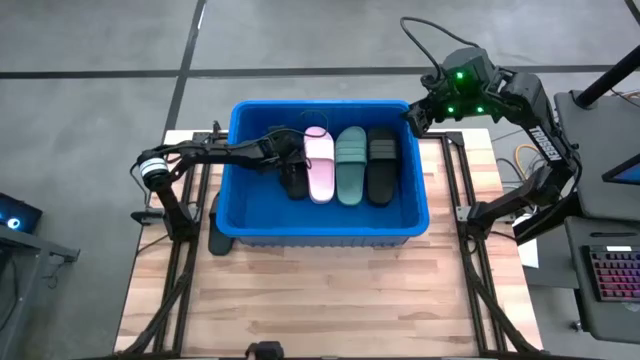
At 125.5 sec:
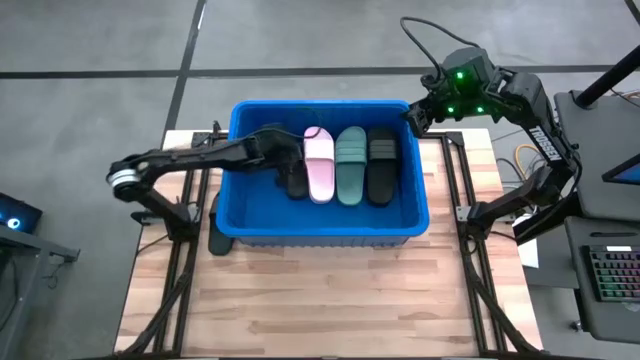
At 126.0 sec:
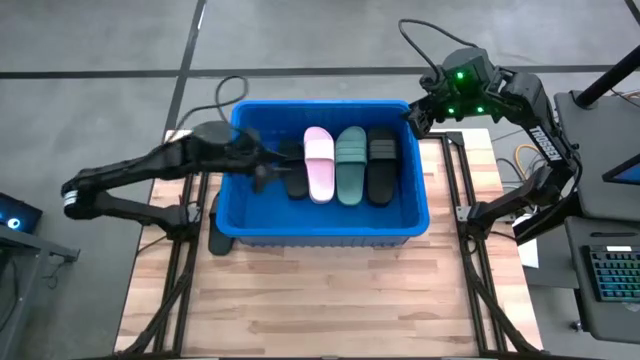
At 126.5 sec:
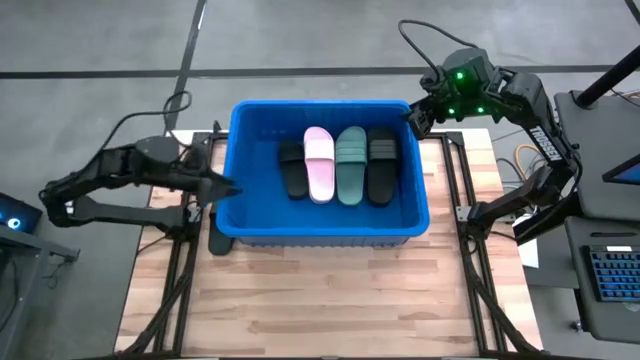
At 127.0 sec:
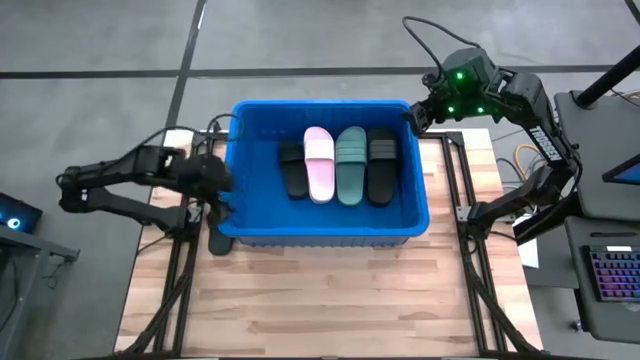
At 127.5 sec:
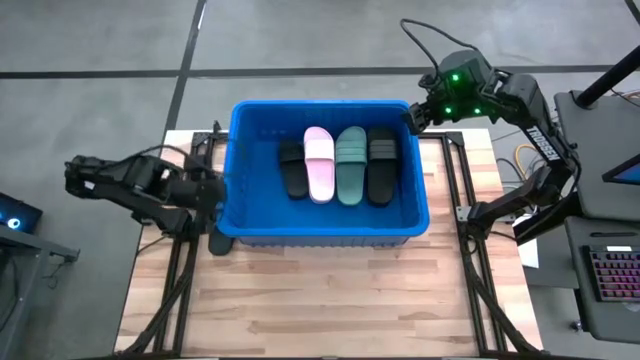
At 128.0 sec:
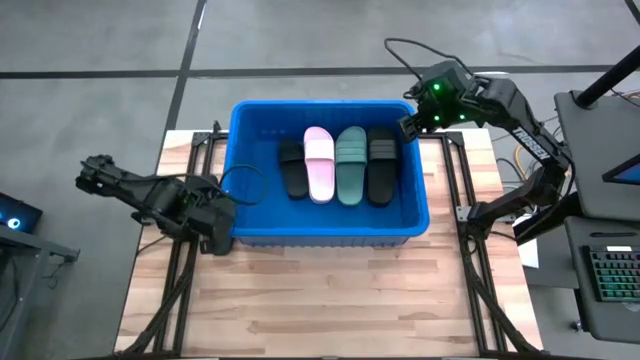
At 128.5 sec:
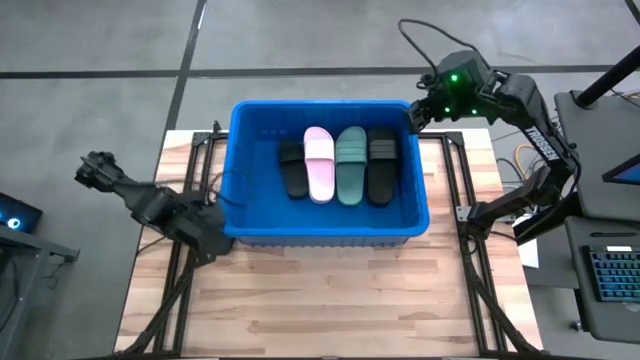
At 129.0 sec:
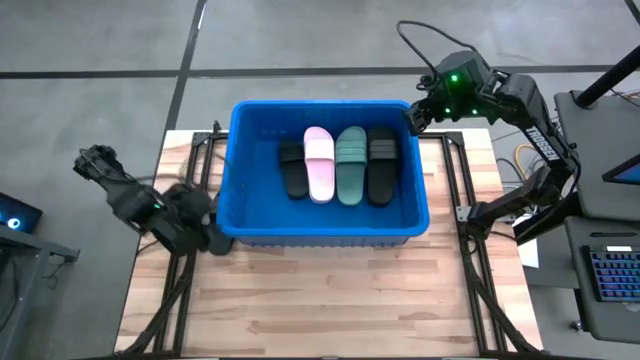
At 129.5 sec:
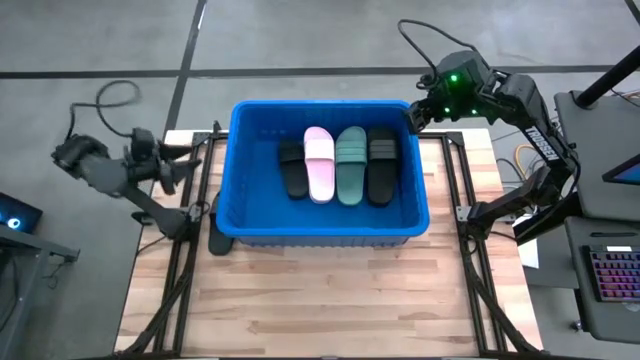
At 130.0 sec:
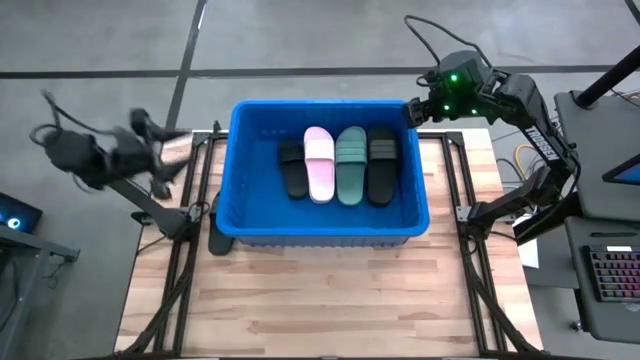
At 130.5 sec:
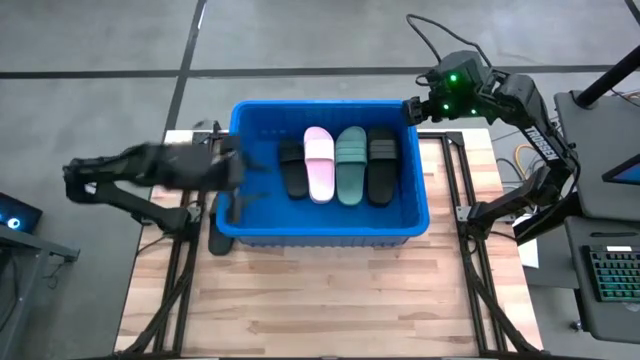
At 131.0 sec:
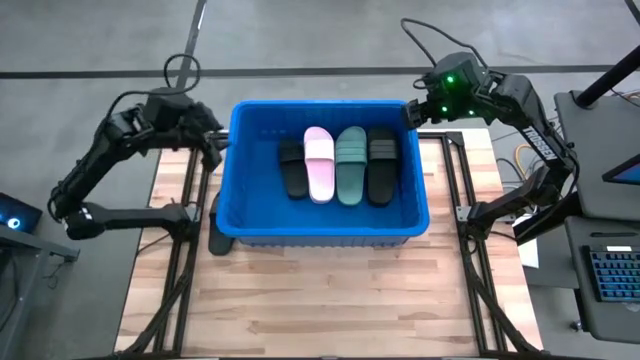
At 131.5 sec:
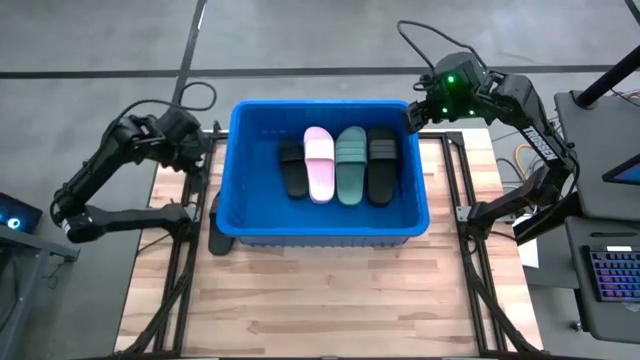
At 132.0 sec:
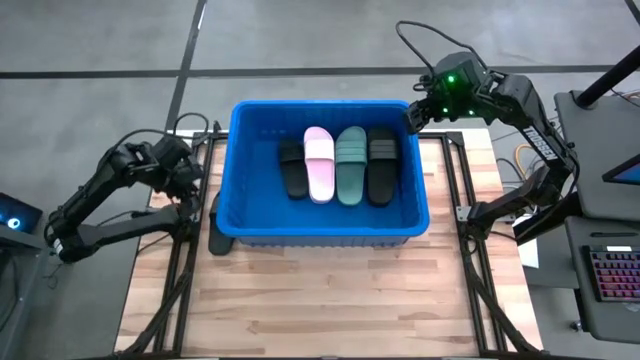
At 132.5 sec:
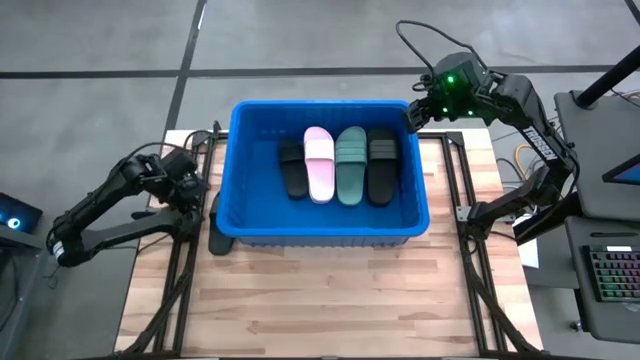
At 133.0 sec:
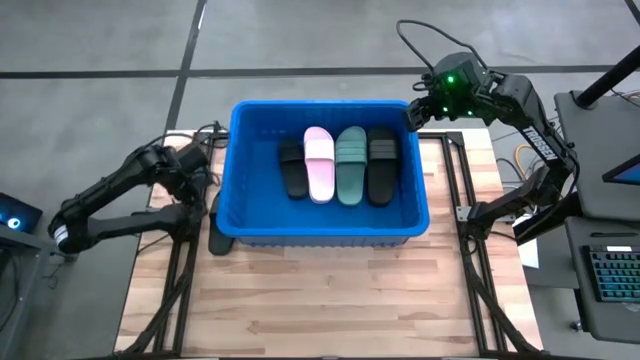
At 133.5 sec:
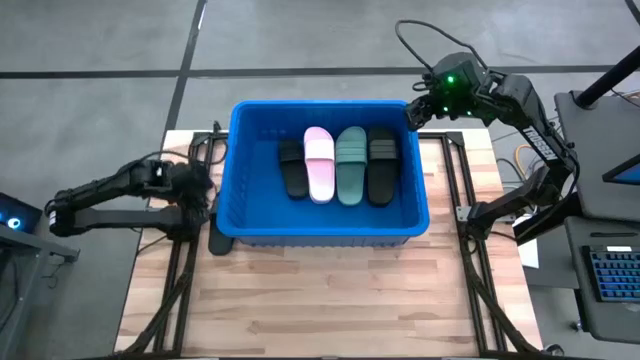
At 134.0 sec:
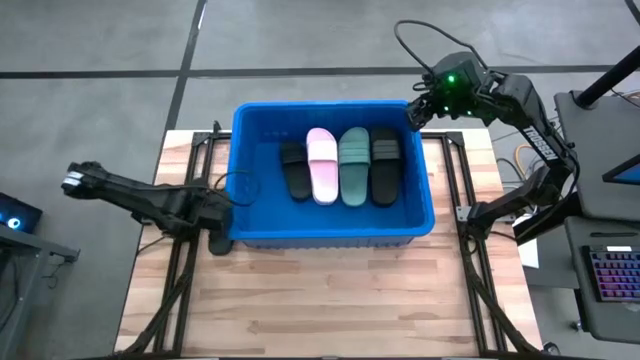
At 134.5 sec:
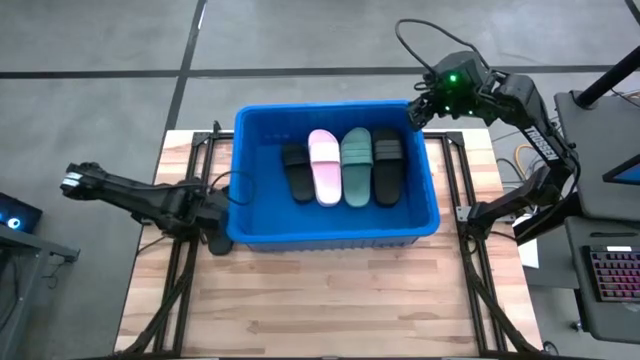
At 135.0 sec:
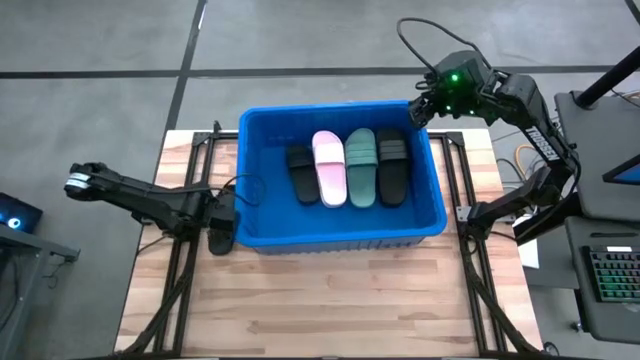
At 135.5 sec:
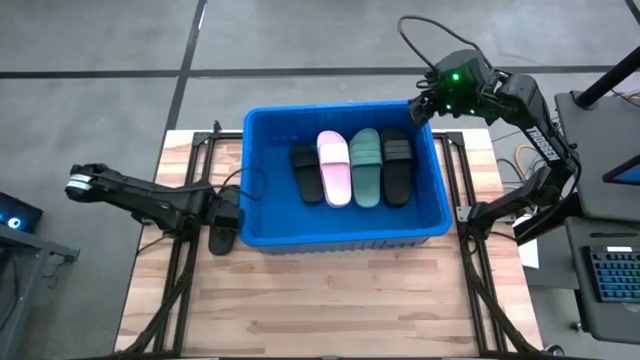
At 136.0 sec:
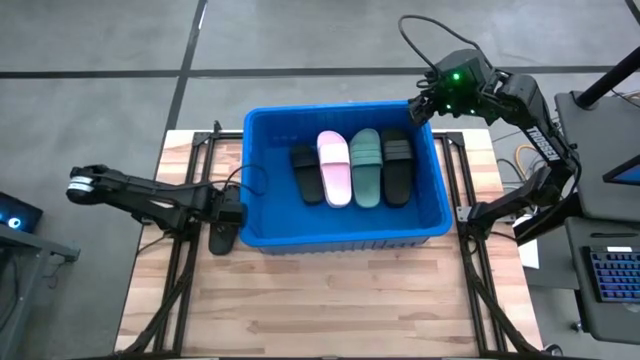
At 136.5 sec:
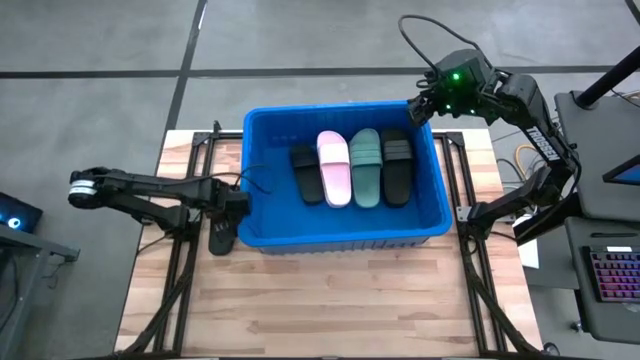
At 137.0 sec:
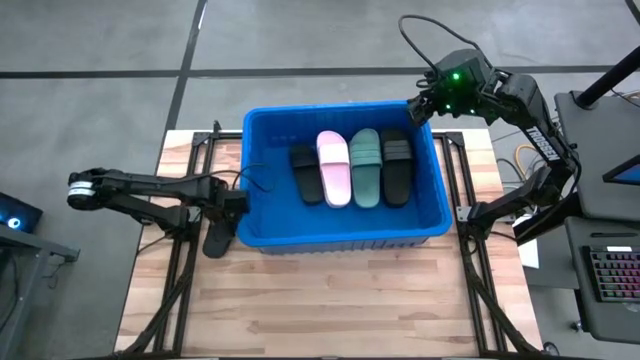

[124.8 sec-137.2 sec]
Task: Pick and place slides into bin
Put the black slide into the blue bin

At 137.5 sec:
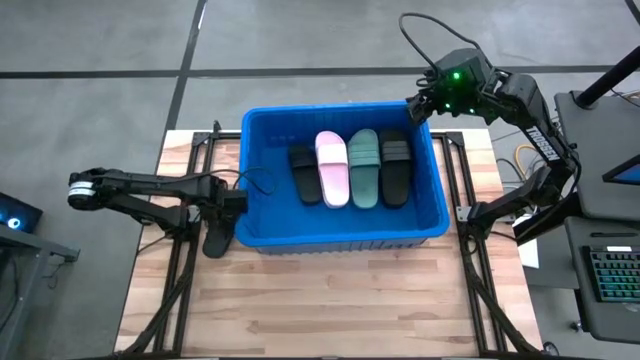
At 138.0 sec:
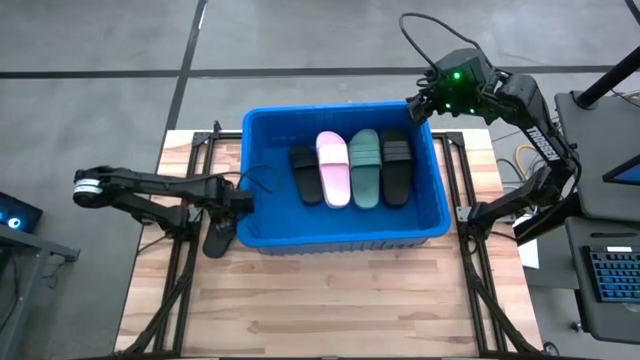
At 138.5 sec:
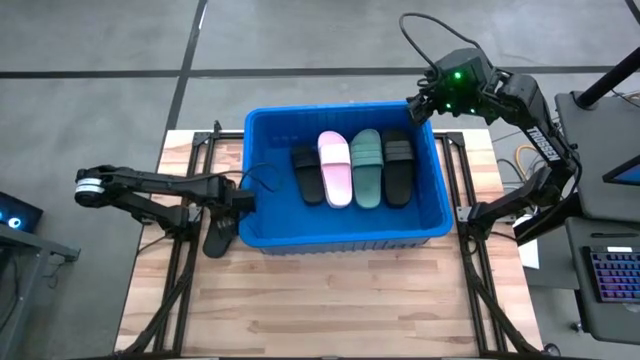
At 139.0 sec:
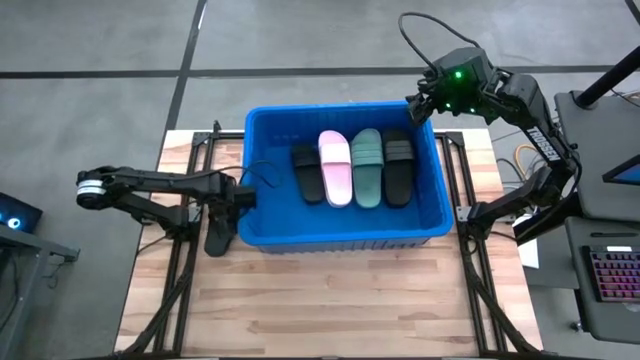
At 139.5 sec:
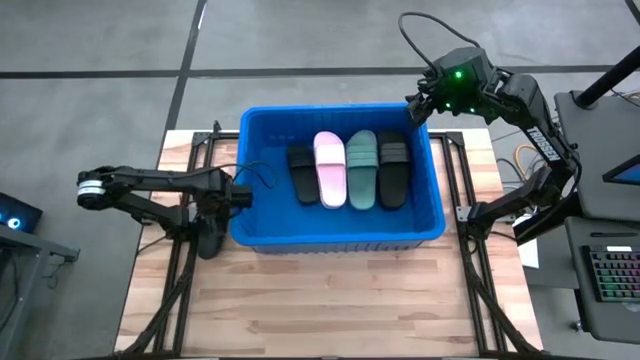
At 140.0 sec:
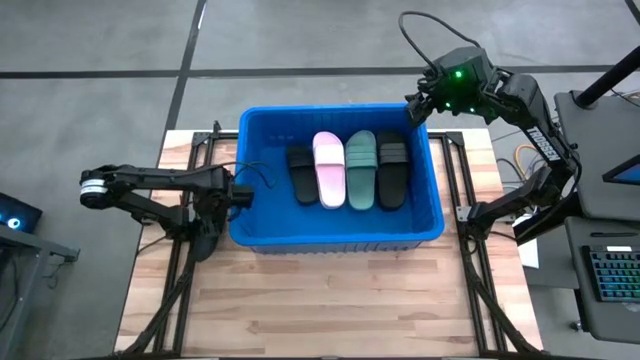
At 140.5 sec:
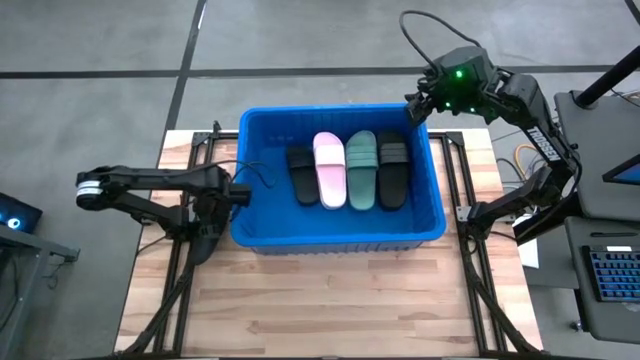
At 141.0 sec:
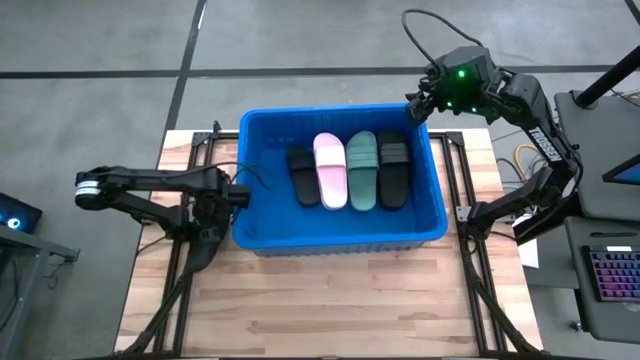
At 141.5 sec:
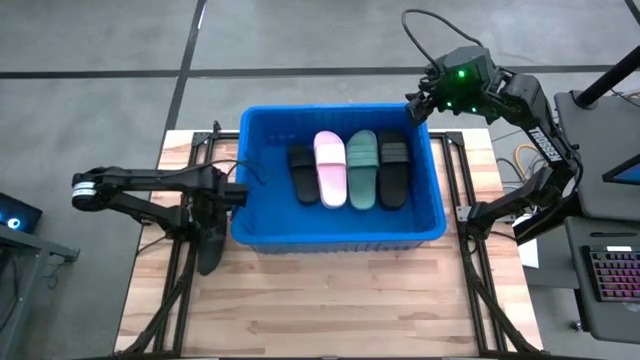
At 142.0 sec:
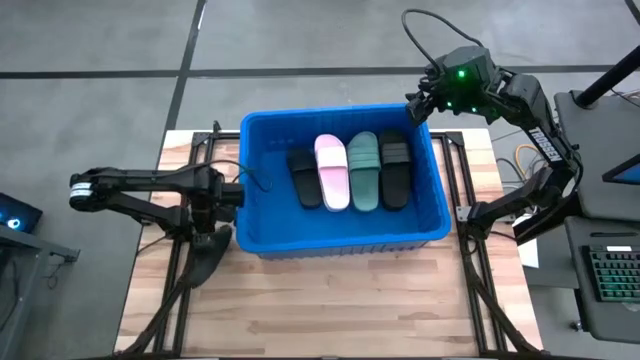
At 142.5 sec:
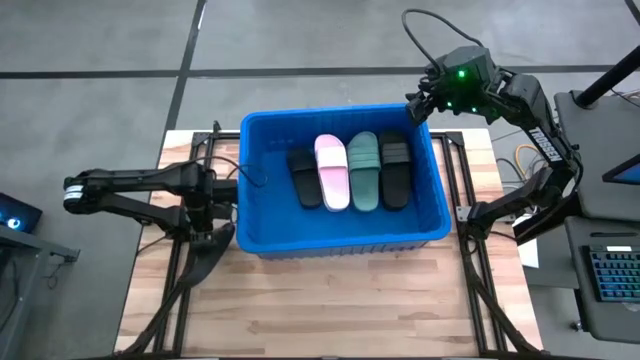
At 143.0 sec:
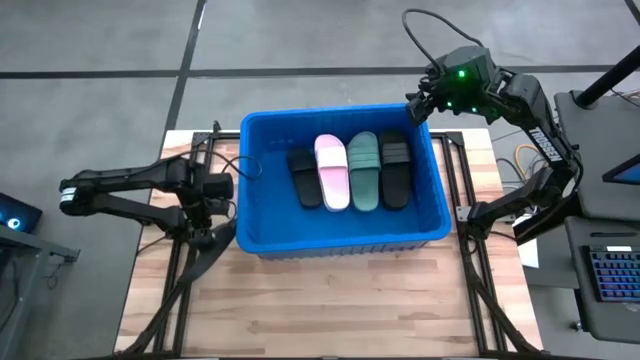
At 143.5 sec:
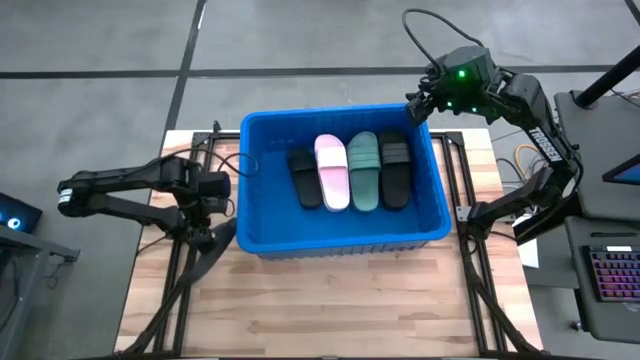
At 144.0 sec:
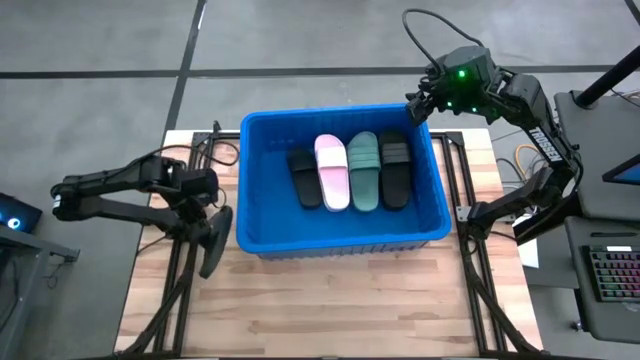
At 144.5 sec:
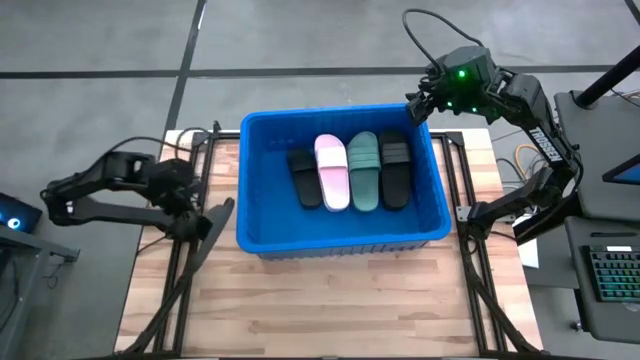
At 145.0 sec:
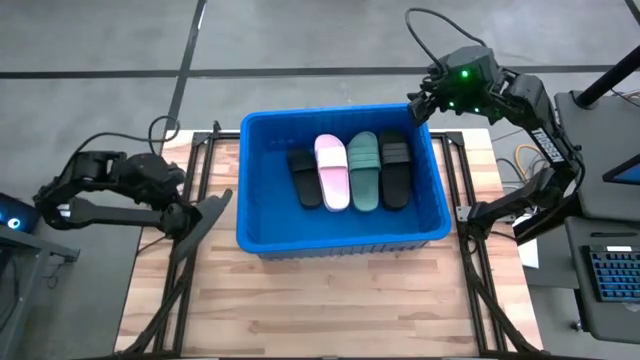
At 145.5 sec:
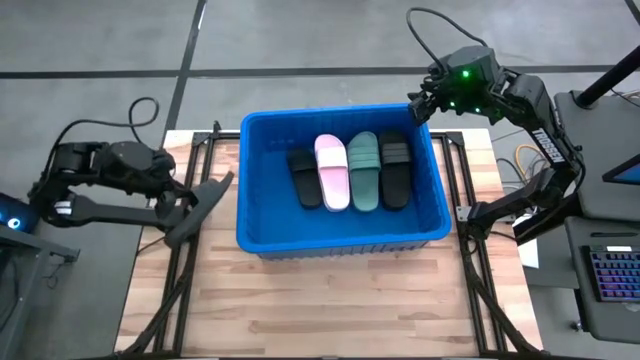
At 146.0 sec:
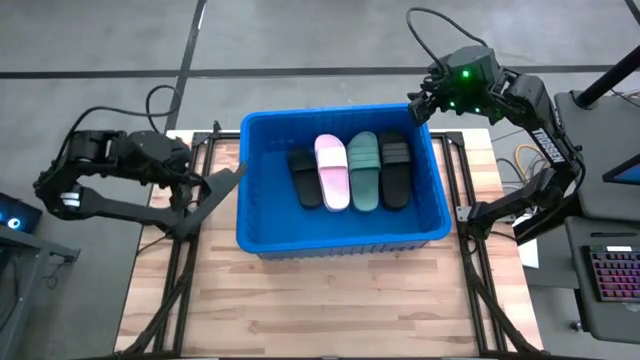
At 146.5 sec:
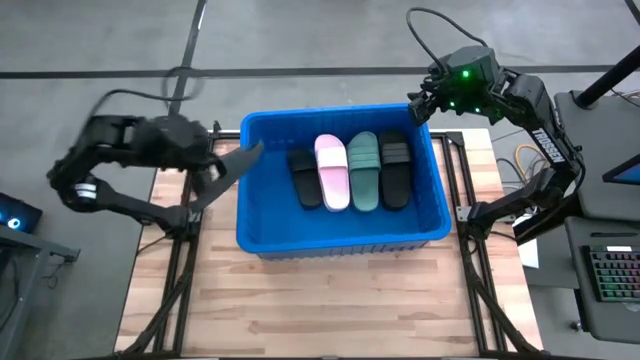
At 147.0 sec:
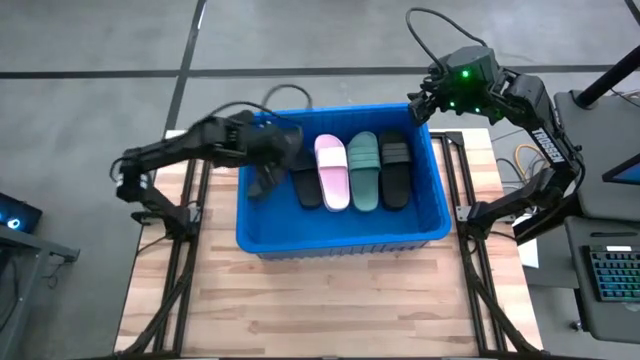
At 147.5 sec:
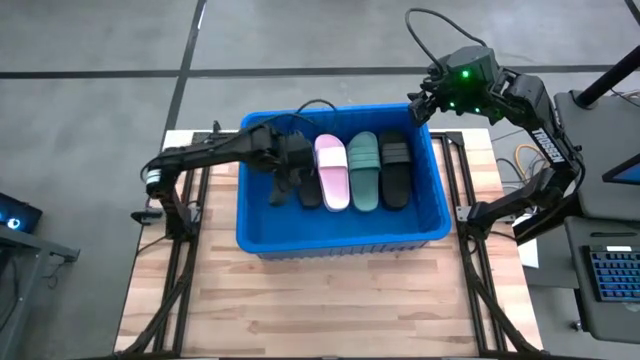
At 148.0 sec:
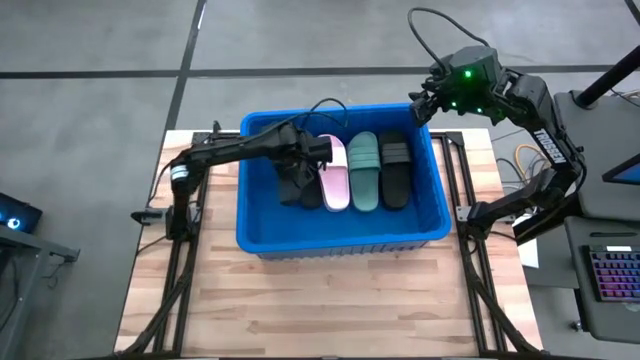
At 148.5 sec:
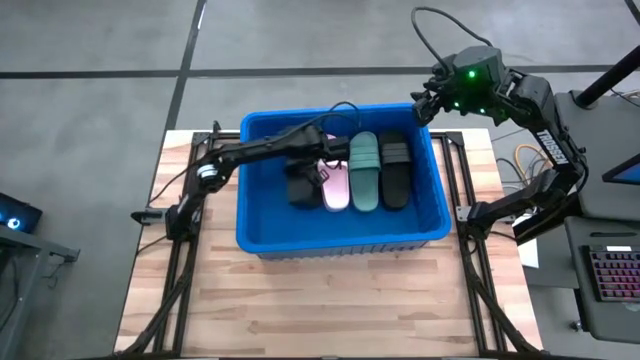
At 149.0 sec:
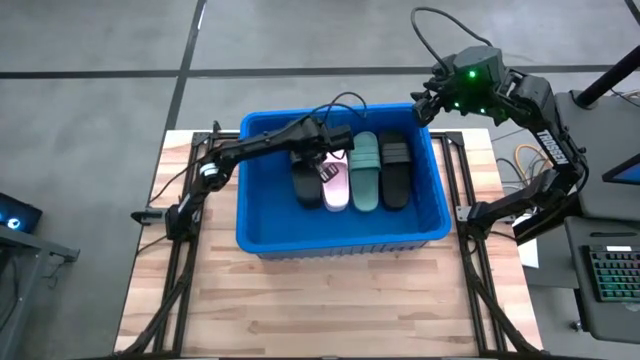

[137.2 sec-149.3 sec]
Put the black slide into the blue bin
